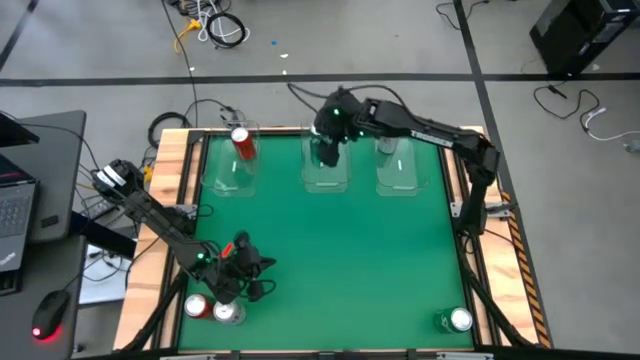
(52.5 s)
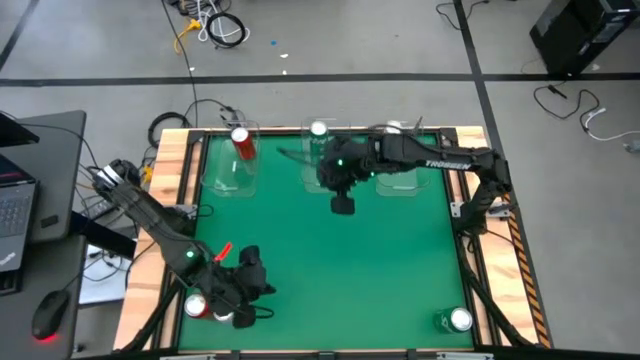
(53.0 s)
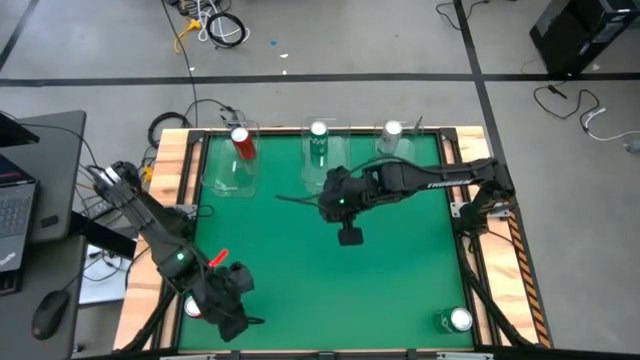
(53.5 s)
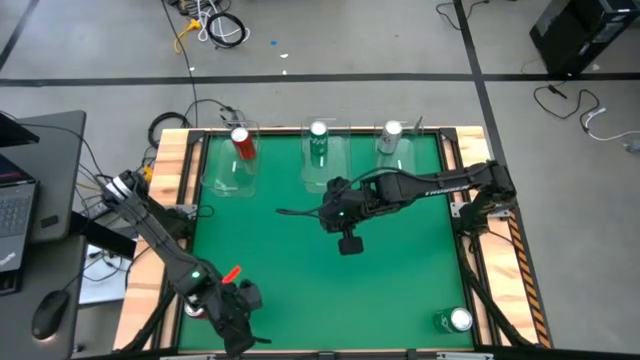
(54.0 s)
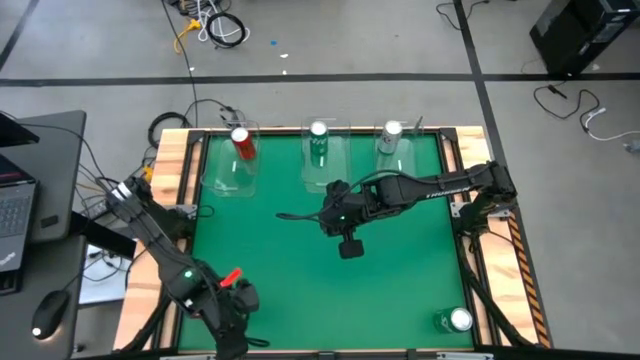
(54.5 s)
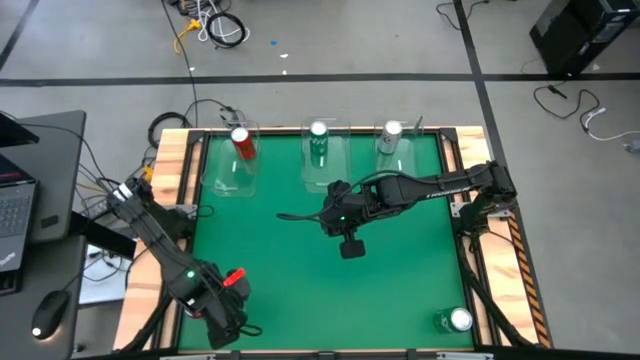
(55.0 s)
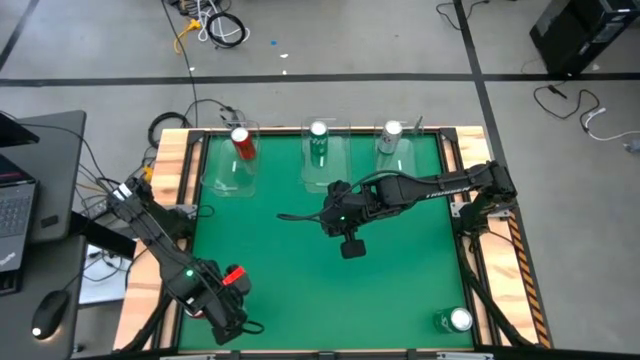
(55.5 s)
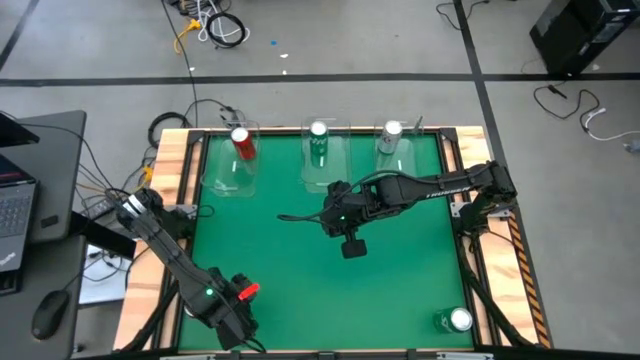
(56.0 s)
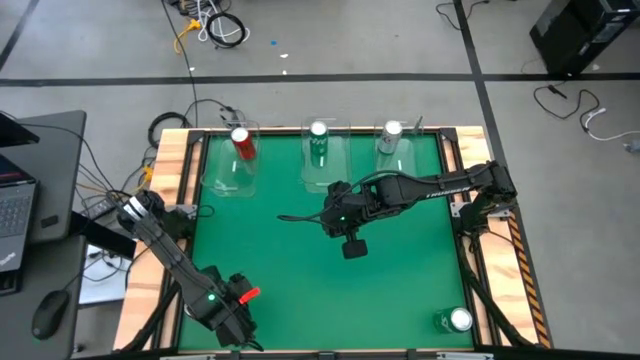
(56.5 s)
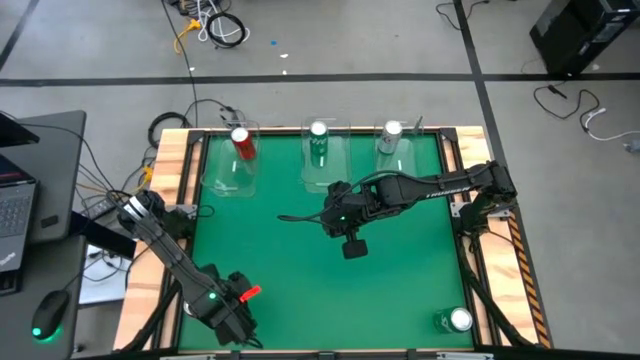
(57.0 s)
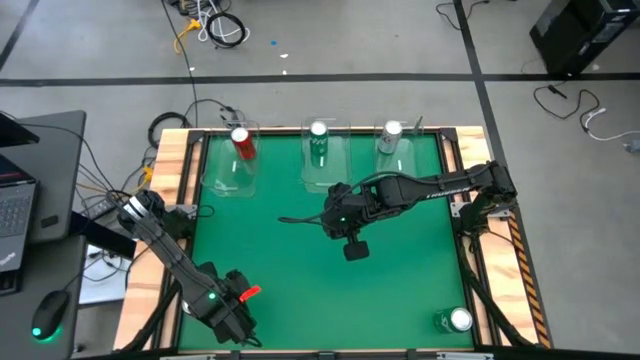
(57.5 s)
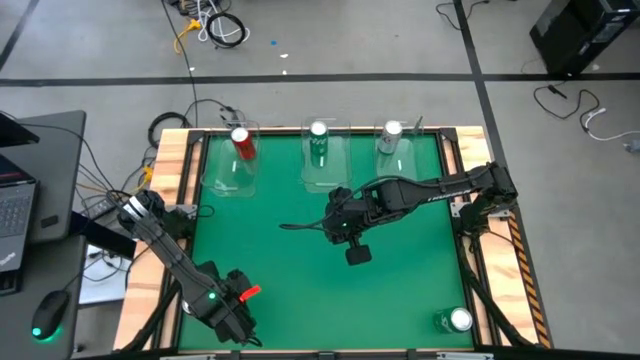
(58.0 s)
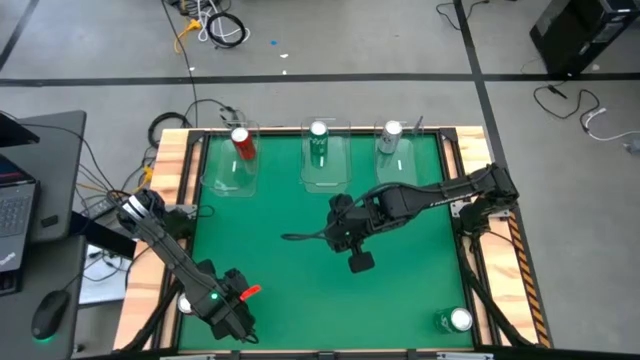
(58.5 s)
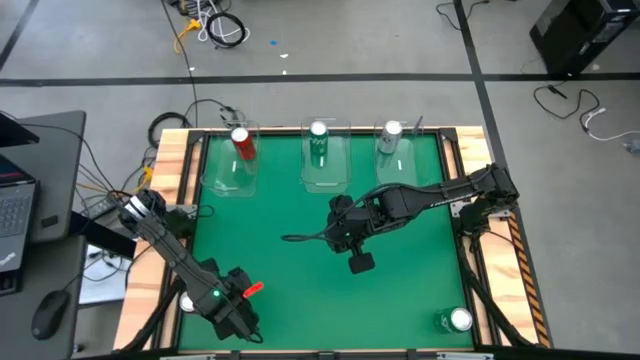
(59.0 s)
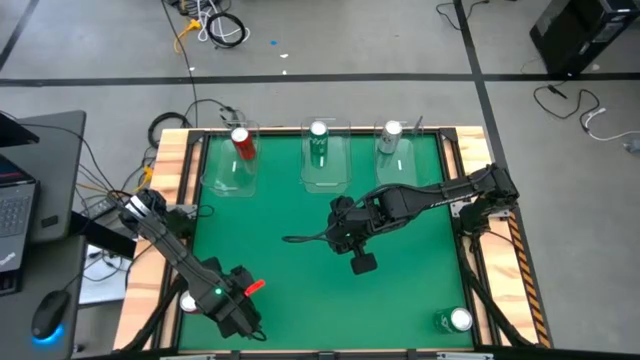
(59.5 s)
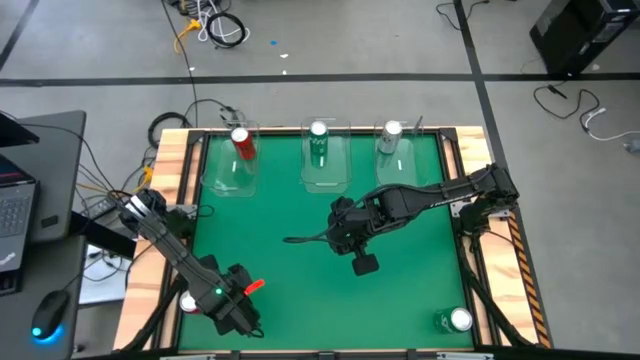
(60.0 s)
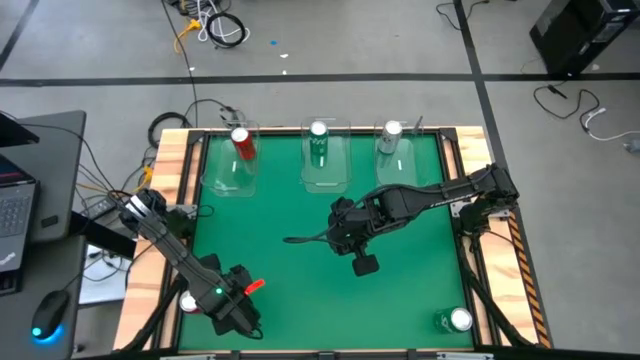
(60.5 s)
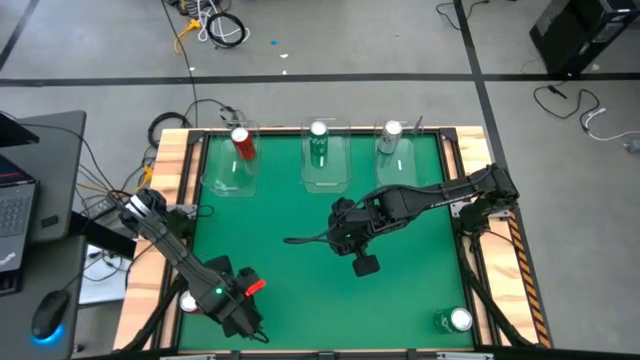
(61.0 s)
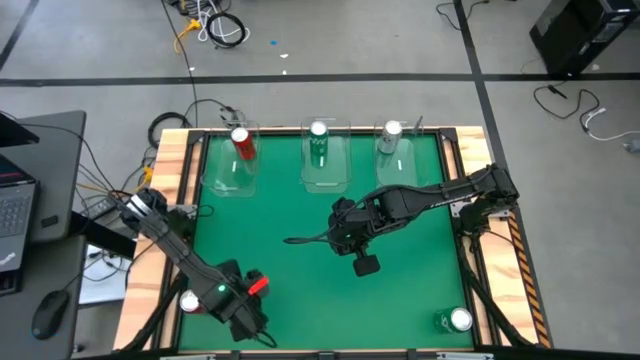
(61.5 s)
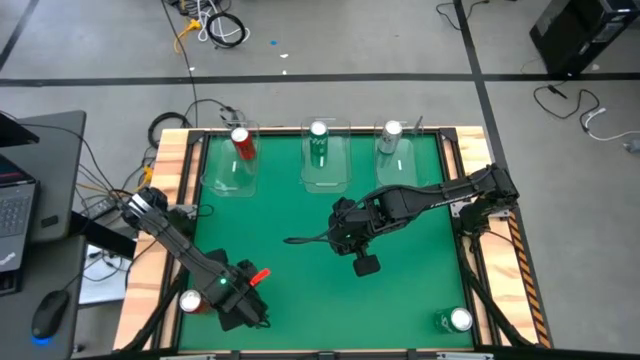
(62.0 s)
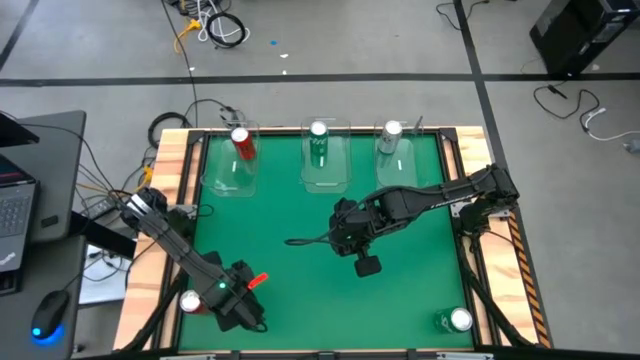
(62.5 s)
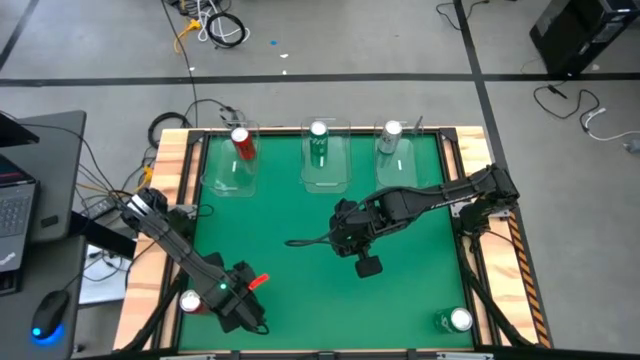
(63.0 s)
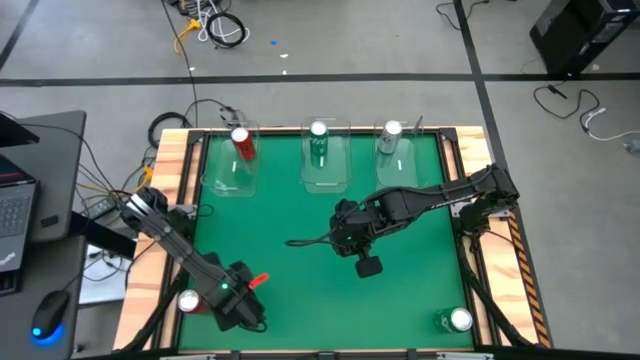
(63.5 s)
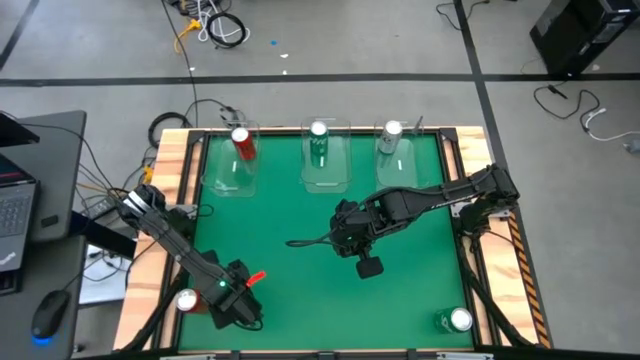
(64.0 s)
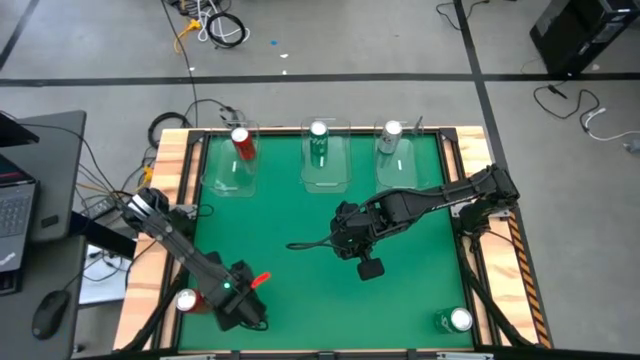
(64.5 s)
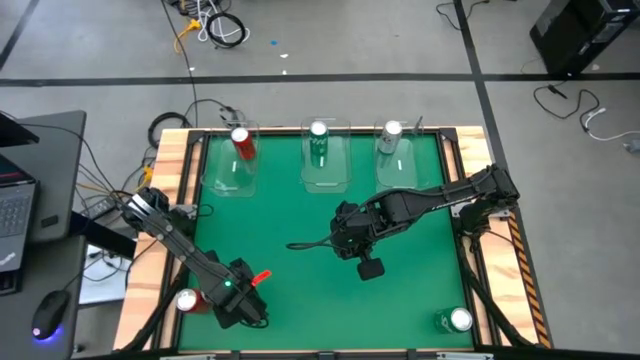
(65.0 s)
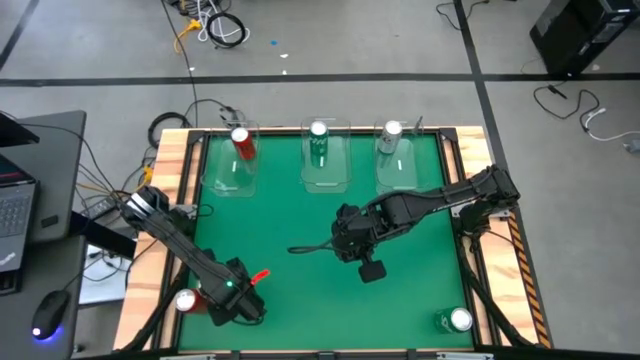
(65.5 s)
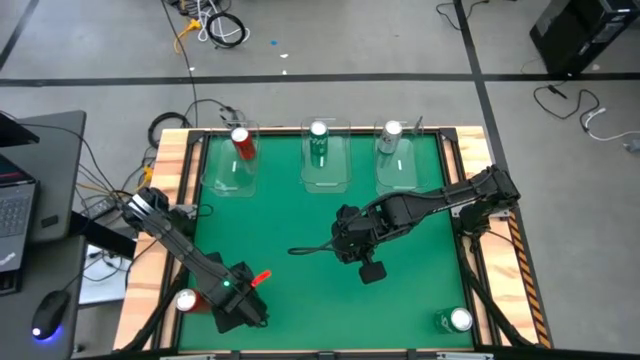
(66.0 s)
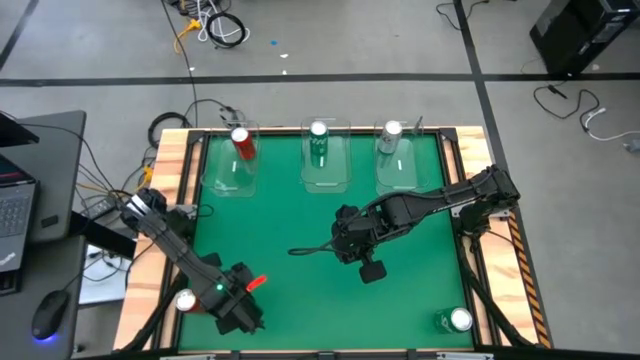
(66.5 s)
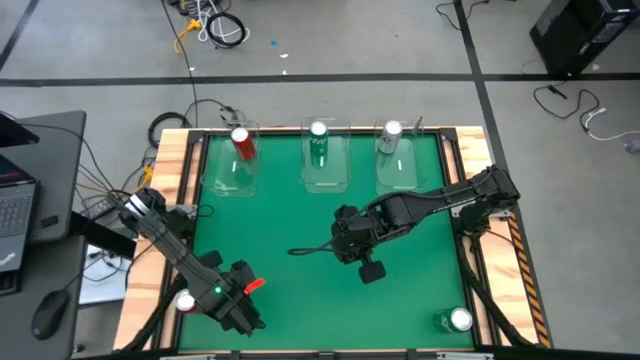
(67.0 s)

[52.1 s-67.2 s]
Task: Sort soda cans
Put the white soda can into the right transparent bin
